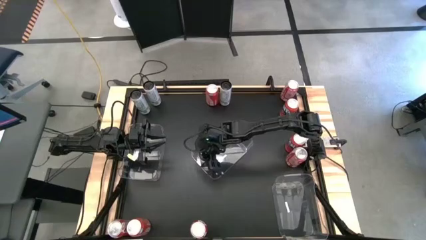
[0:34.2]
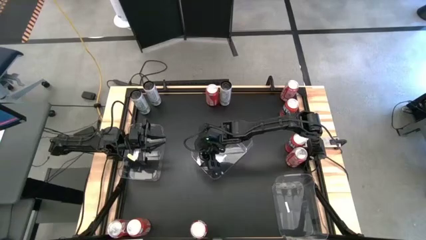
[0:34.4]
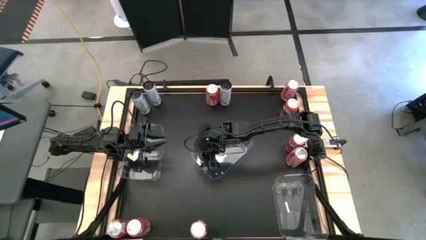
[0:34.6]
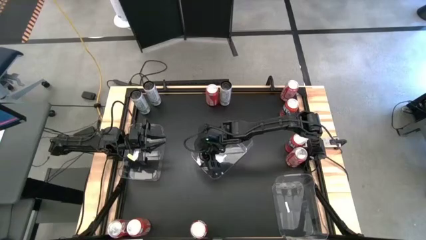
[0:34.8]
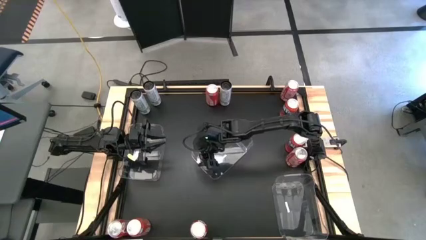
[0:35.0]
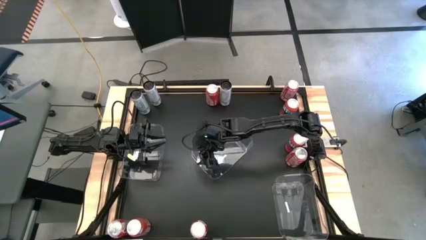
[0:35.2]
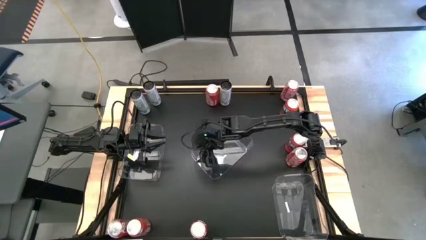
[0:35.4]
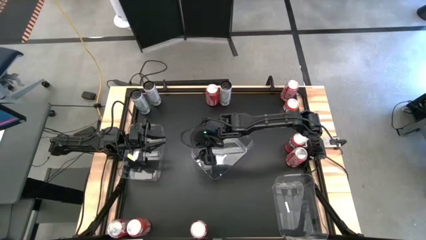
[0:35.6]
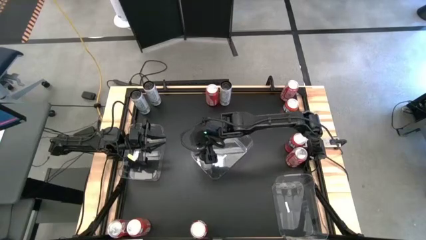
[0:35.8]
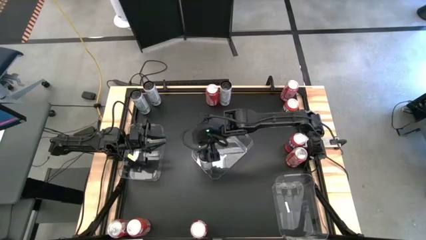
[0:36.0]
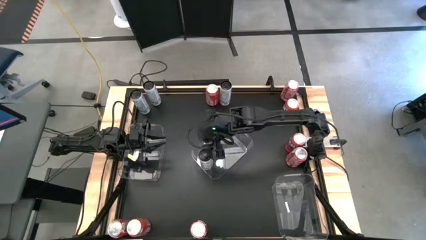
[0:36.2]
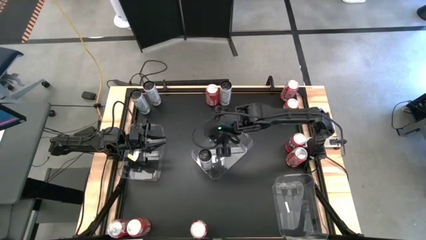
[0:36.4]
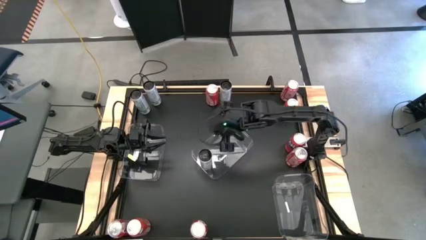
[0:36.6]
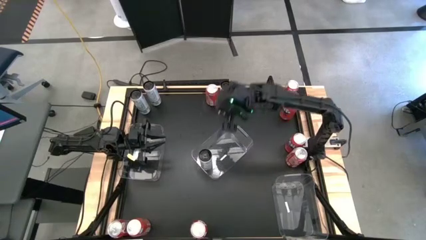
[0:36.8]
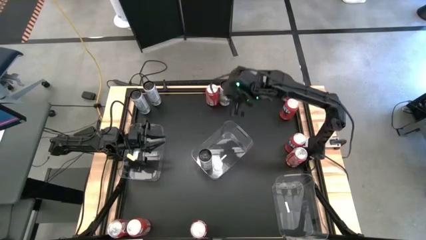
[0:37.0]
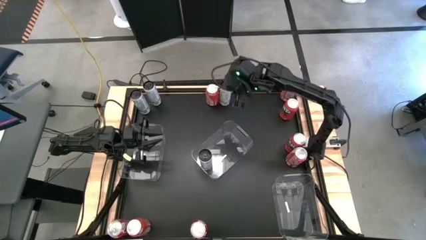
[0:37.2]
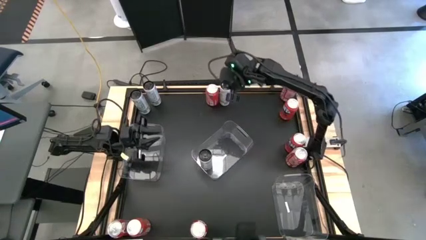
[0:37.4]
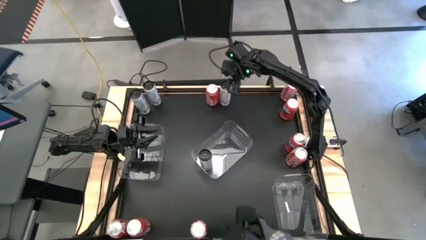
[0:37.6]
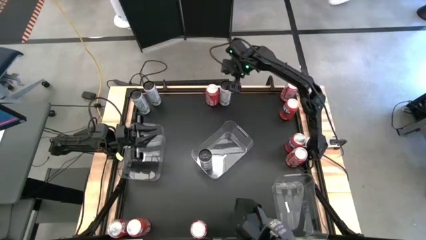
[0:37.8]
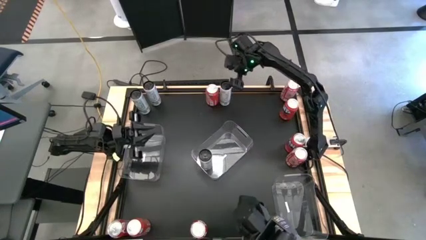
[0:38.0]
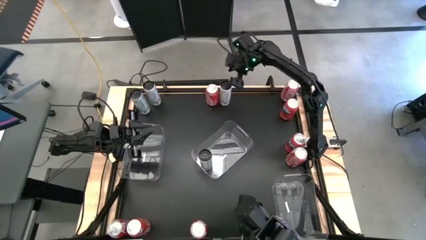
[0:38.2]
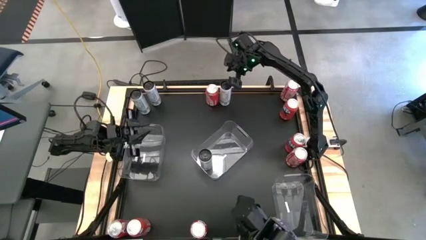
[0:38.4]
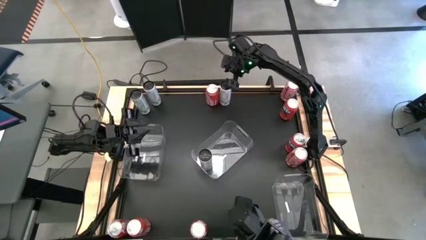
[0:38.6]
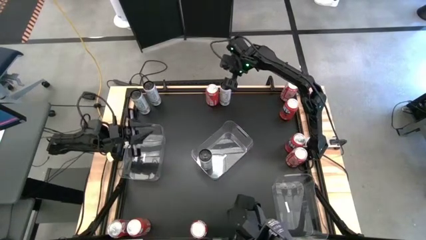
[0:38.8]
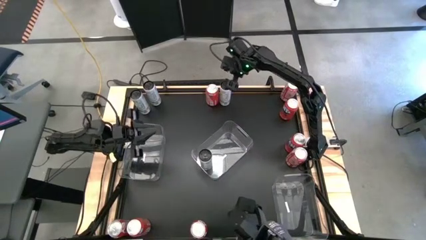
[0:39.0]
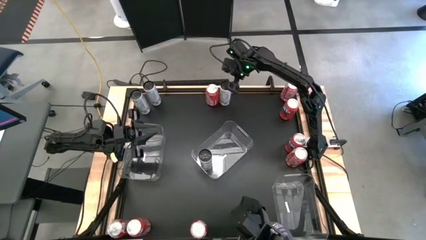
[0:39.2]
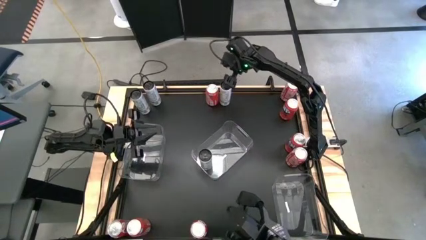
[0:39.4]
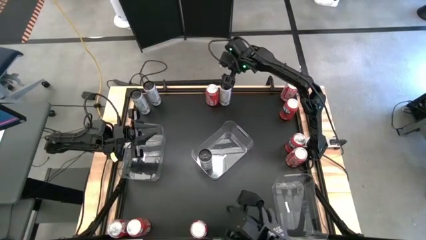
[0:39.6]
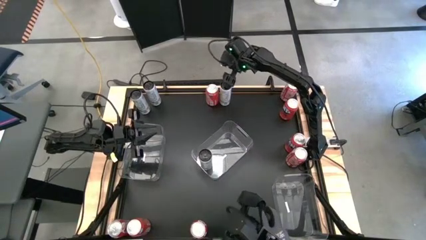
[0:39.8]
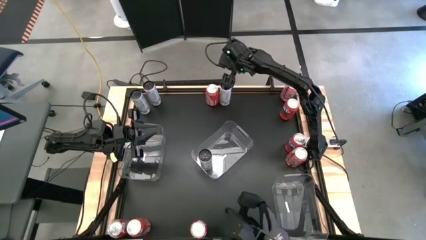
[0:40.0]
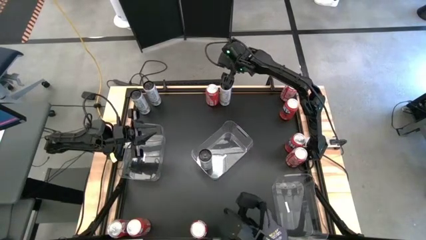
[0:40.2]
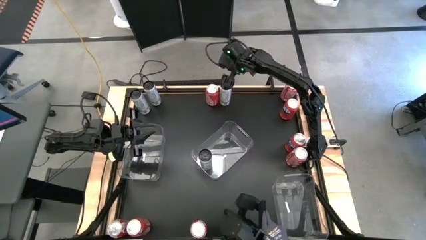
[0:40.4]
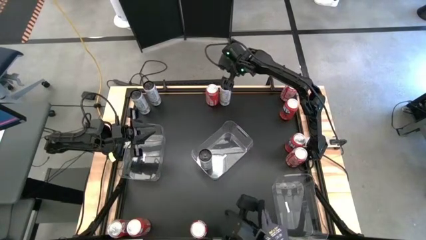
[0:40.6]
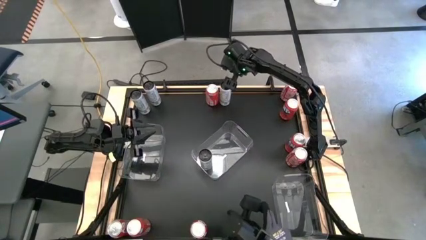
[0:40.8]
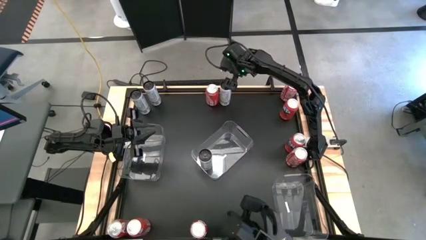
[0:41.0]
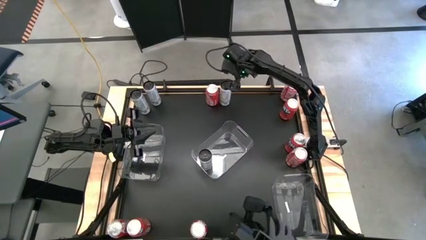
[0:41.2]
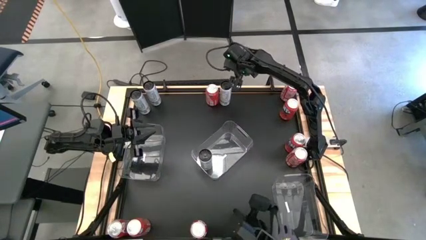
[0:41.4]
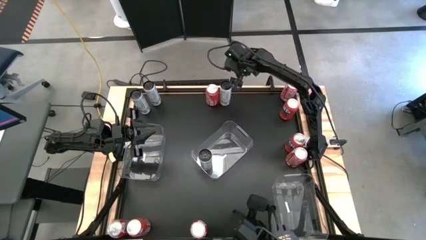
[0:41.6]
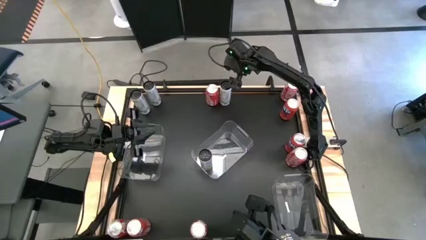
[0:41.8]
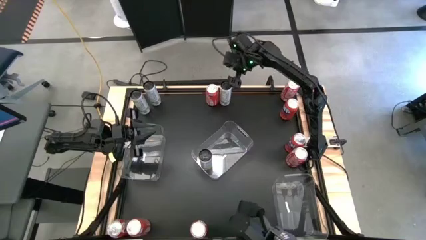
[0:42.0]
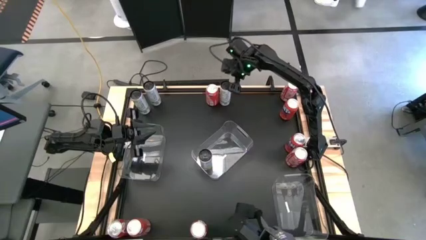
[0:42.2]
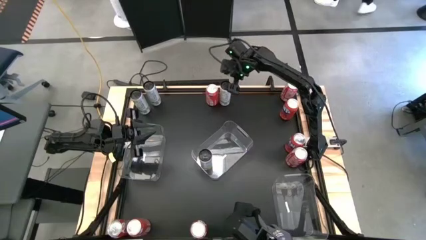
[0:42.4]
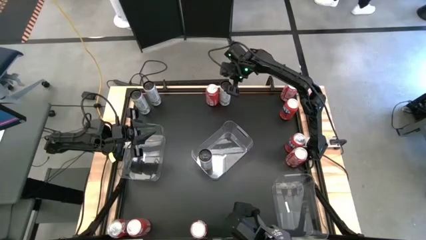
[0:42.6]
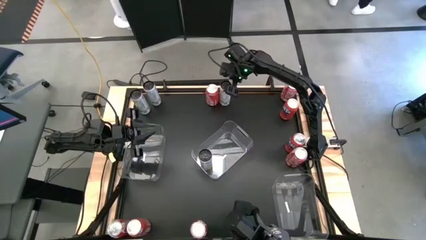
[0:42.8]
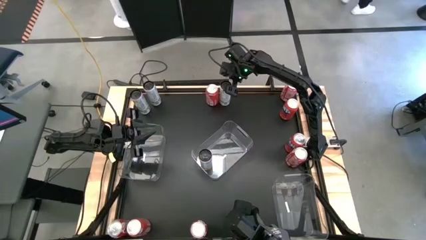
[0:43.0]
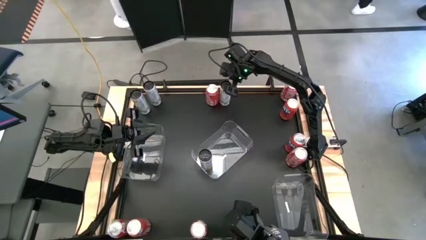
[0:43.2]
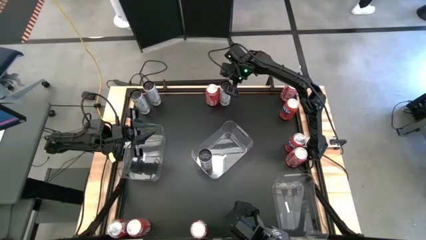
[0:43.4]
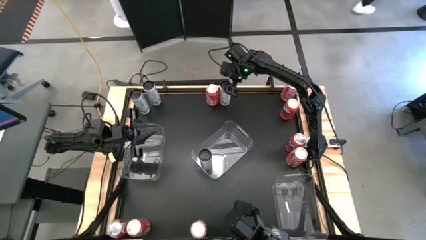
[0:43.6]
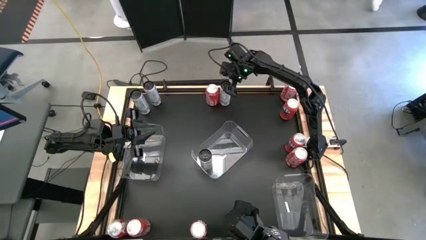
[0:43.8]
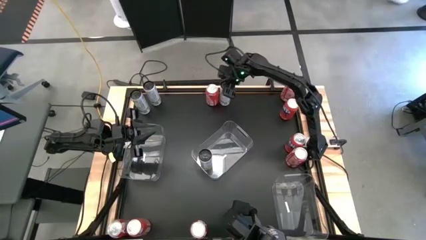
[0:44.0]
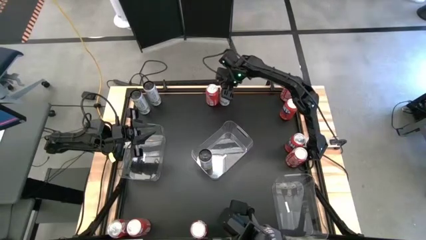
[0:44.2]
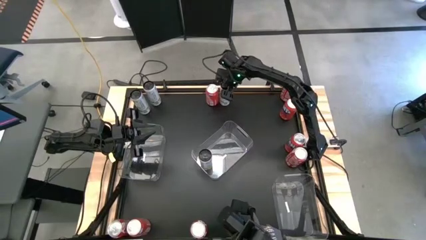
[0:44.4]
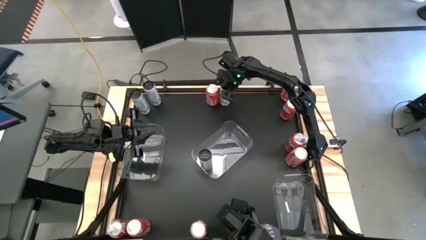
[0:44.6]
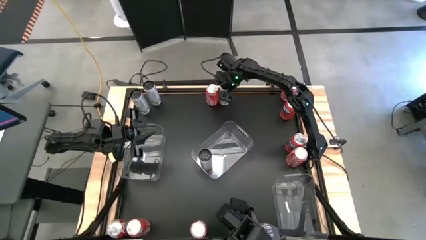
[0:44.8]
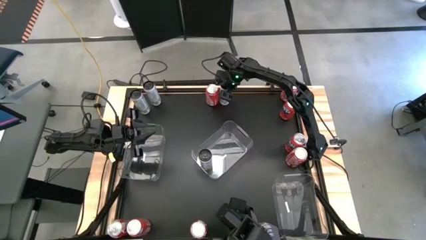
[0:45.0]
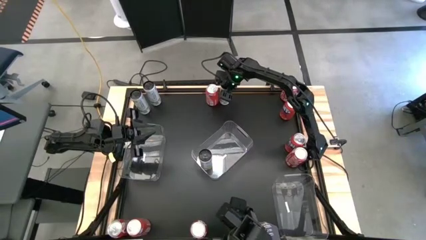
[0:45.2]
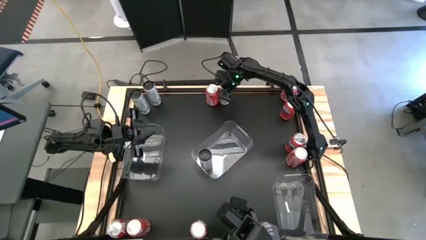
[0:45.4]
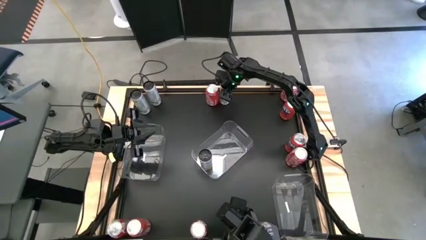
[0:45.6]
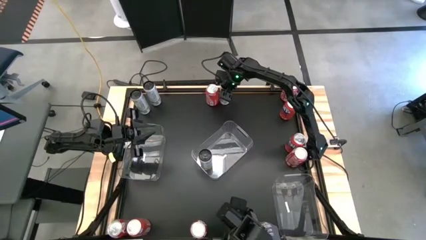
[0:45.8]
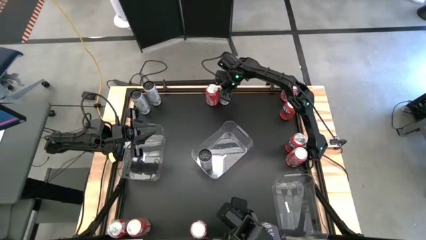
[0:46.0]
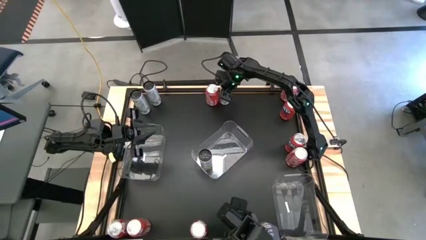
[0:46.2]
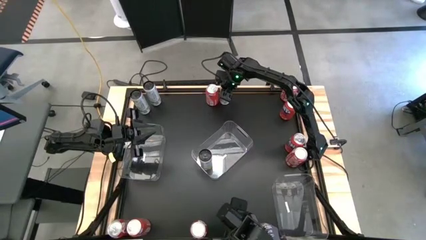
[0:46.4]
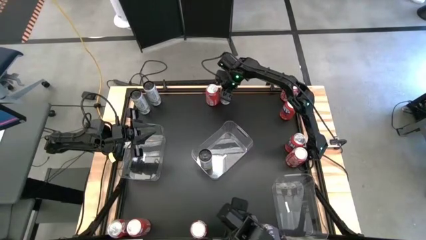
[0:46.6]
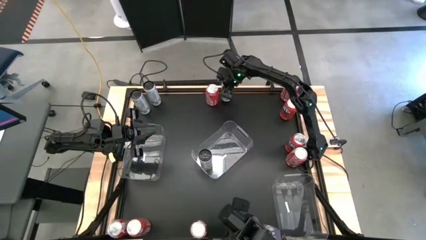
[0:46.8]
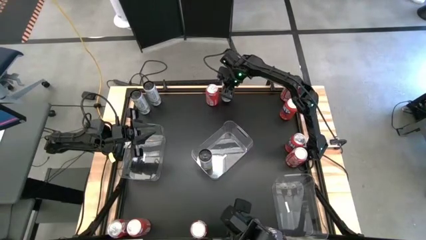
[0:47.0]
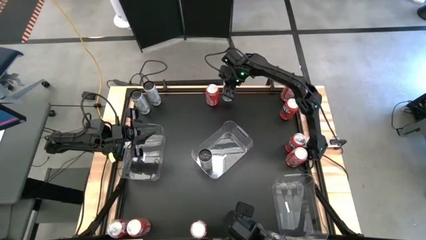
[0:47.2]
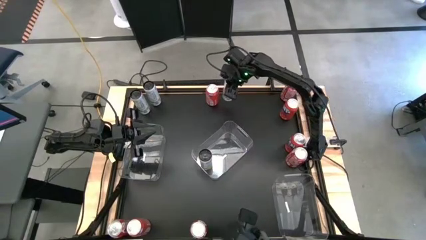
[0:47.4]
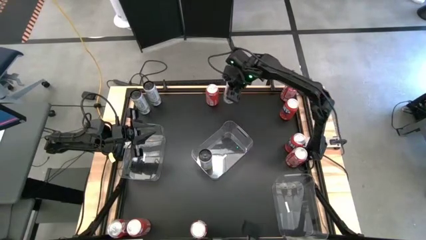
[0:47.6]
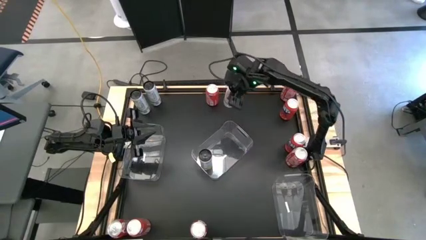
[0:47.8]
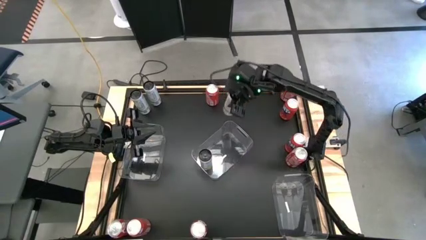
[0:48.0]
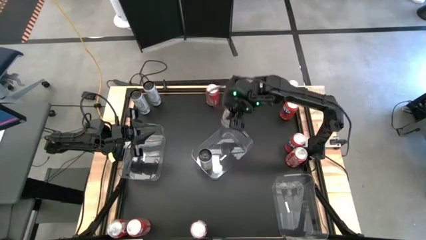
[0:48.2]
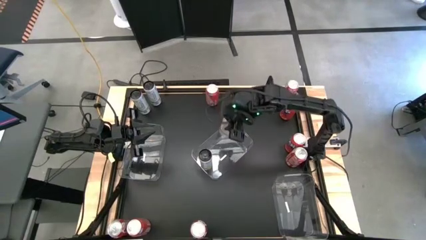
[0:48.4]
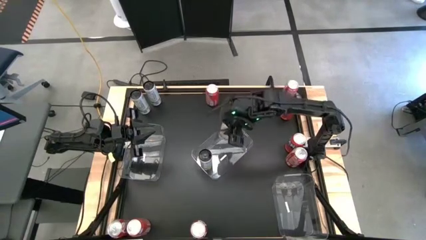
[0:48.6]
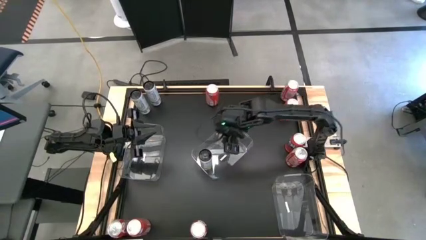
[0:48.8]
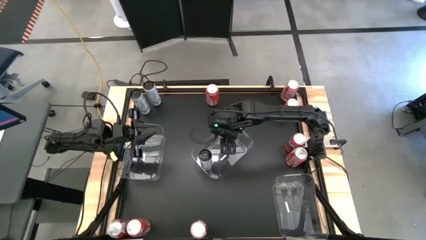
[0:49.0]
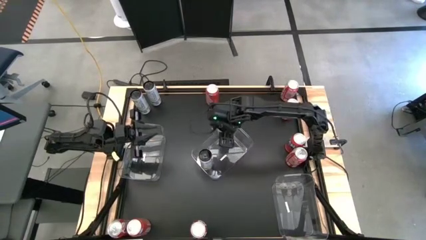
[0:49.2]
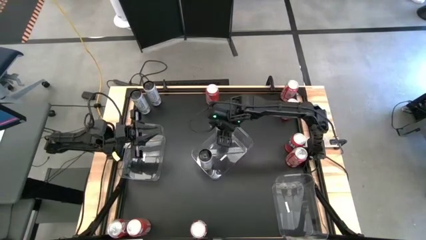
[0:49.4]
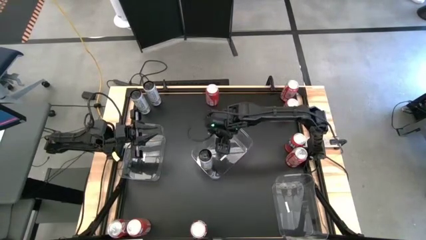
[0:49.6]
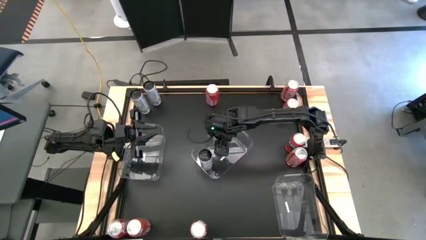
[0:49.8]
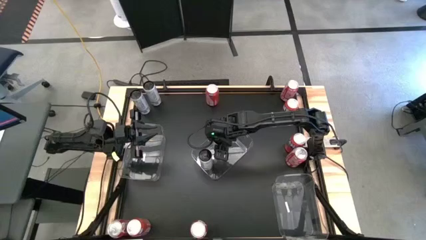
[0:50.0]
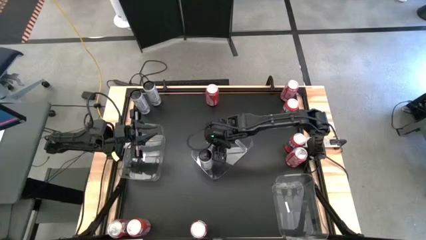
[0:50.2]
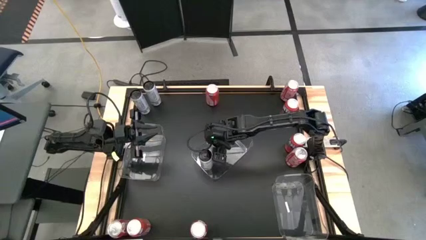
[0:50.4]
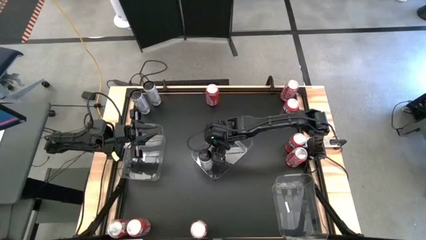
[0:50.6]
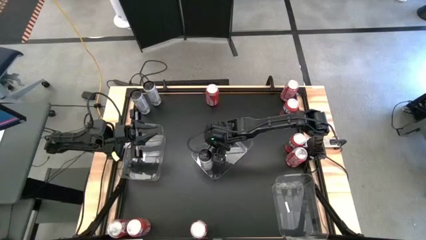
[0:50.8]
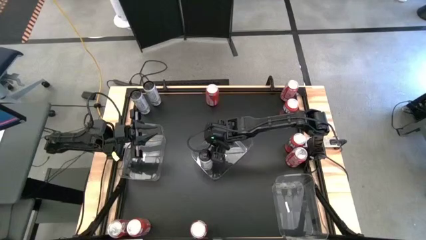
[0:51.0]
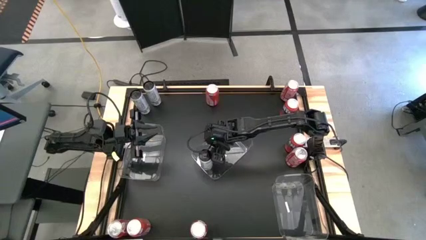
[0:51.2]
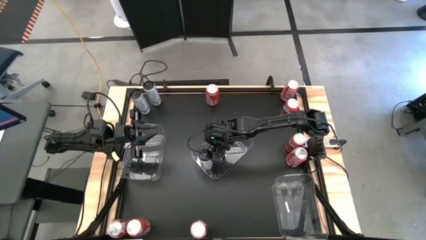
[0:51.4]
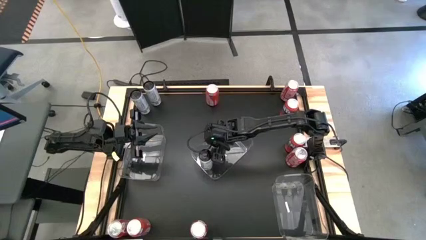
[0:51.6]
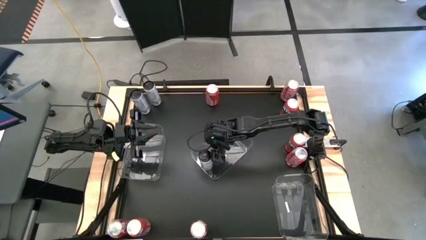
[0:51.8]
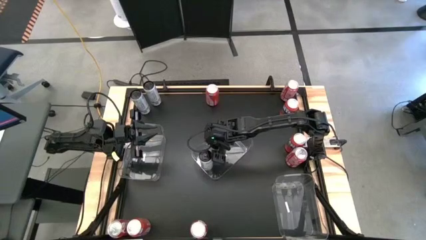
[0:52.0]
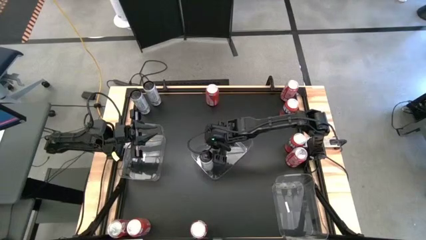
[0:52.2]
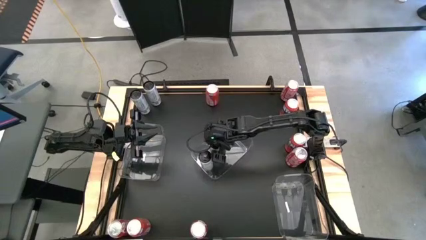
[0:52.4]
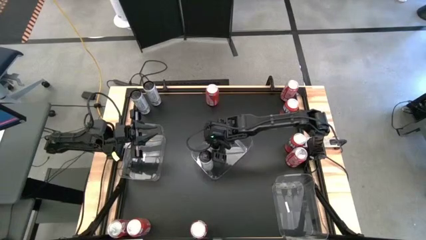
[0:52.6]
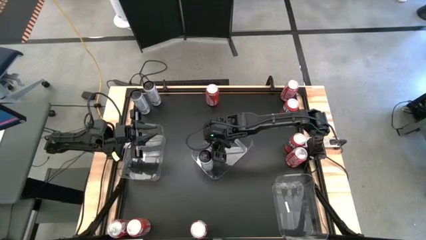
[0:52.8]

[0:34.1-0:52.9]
Task: Sort soda cans
Put the white soda can into the middle transparent bin
